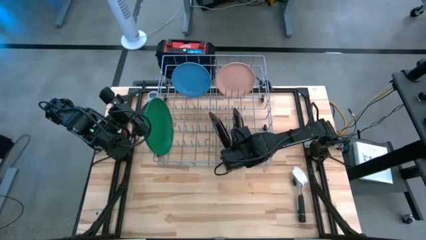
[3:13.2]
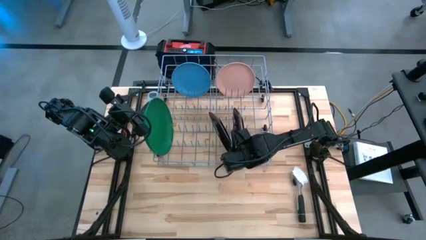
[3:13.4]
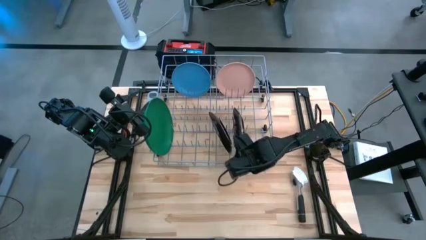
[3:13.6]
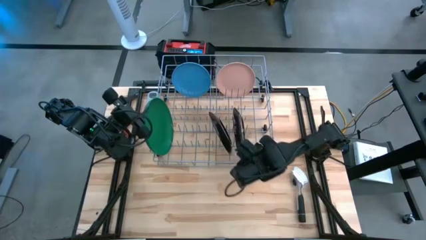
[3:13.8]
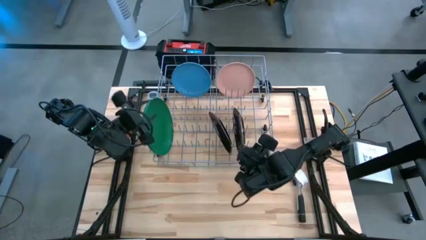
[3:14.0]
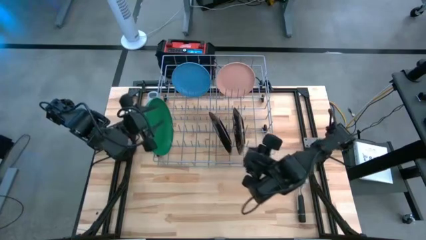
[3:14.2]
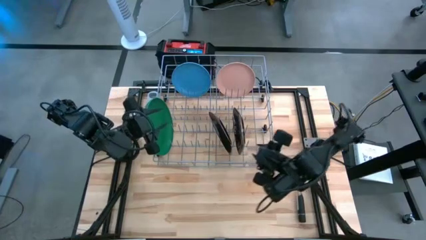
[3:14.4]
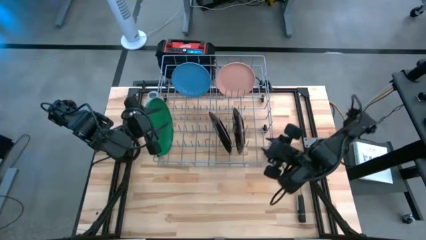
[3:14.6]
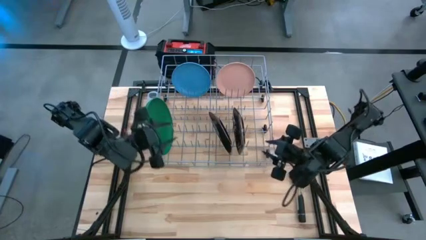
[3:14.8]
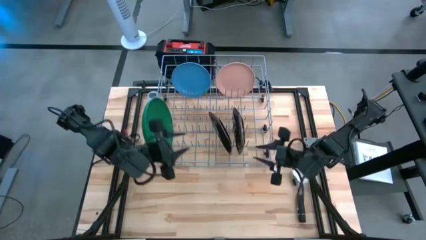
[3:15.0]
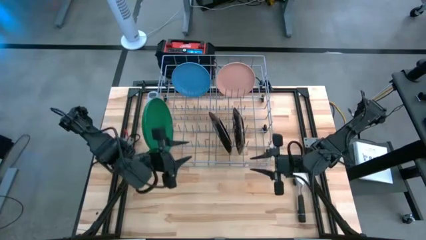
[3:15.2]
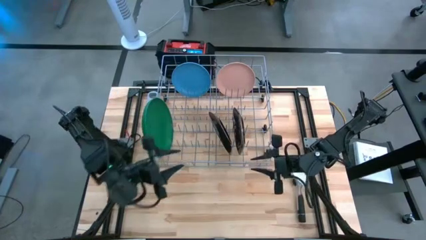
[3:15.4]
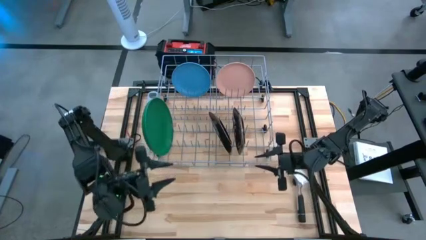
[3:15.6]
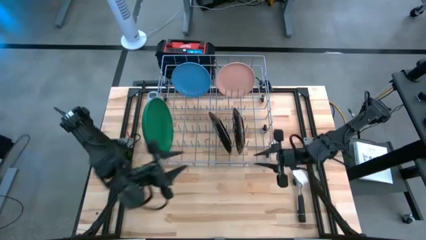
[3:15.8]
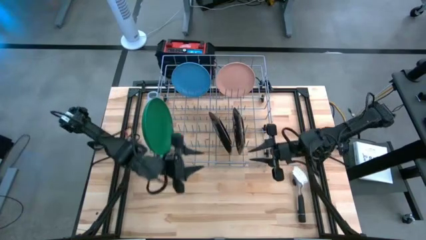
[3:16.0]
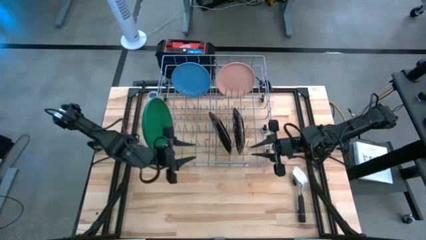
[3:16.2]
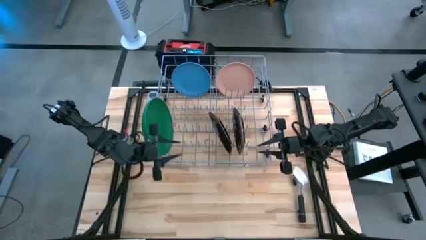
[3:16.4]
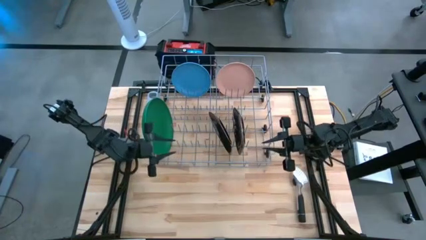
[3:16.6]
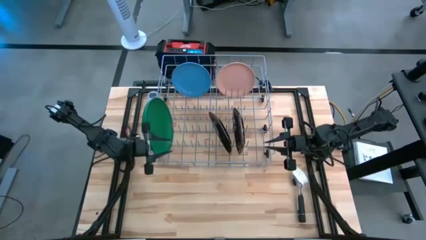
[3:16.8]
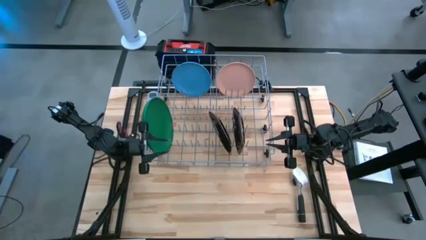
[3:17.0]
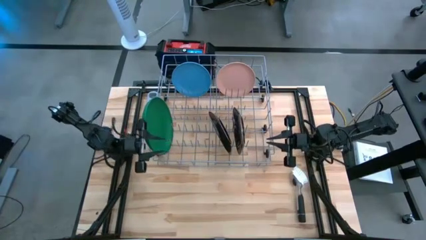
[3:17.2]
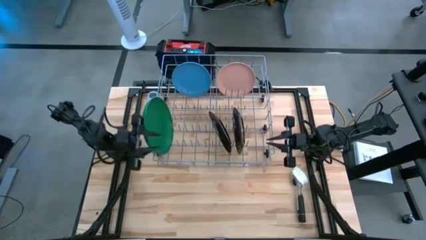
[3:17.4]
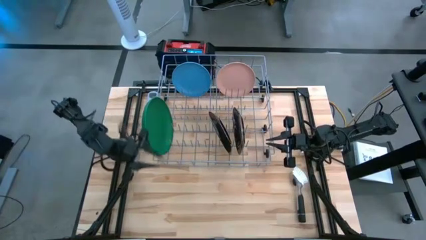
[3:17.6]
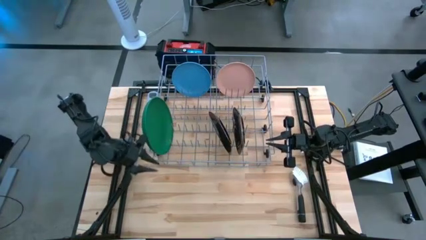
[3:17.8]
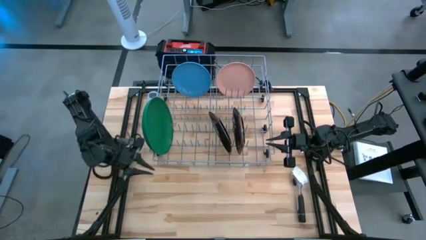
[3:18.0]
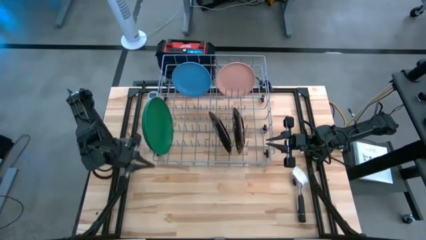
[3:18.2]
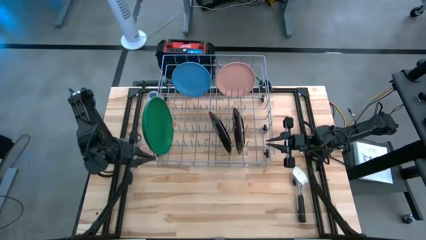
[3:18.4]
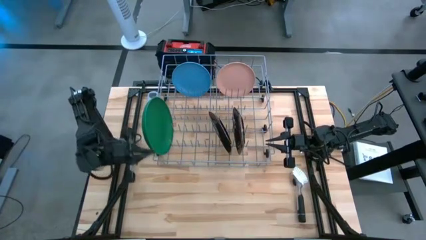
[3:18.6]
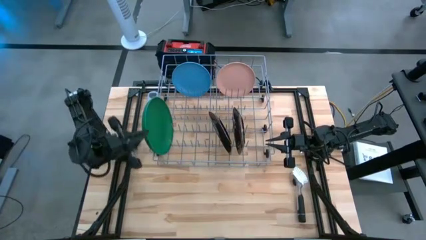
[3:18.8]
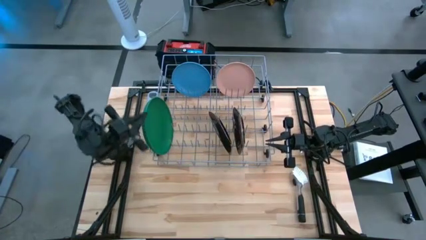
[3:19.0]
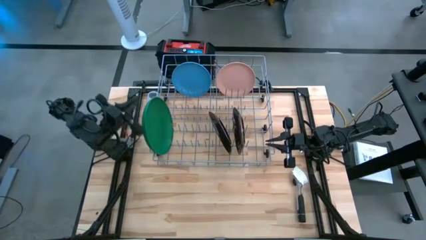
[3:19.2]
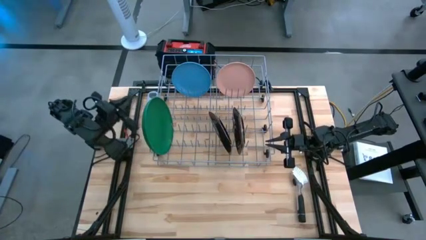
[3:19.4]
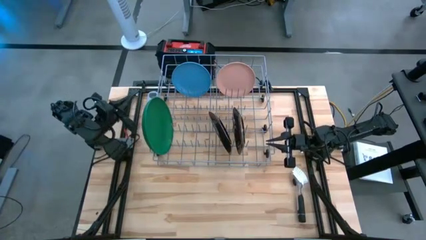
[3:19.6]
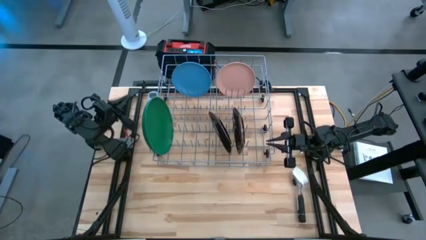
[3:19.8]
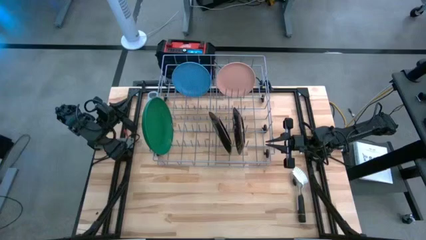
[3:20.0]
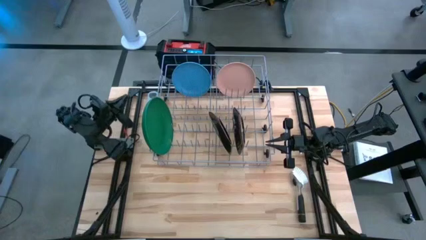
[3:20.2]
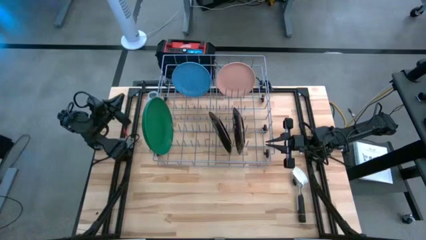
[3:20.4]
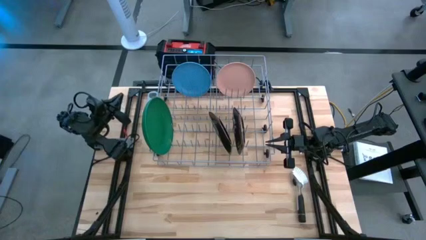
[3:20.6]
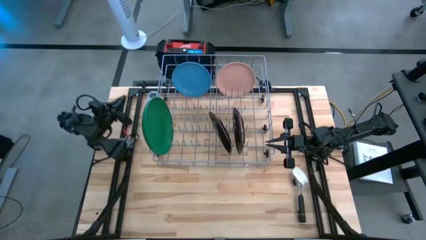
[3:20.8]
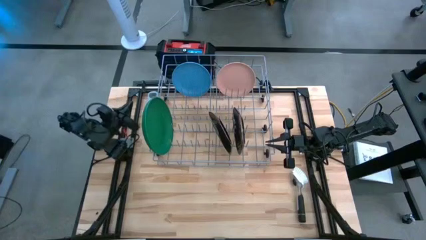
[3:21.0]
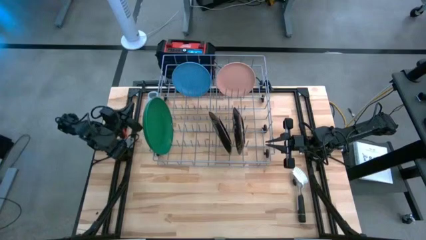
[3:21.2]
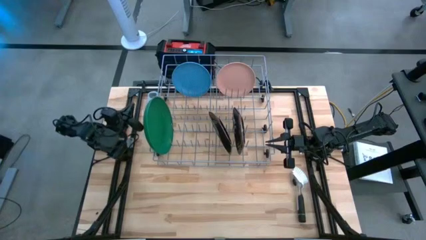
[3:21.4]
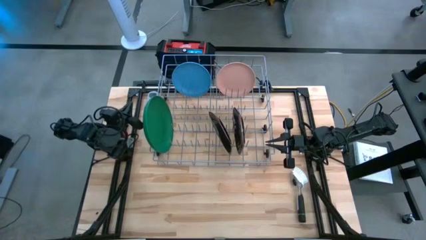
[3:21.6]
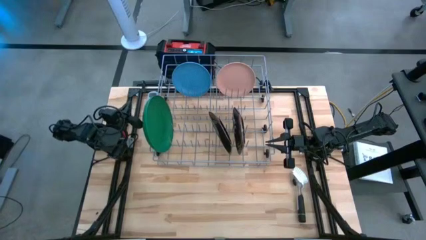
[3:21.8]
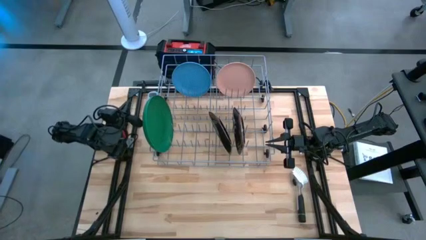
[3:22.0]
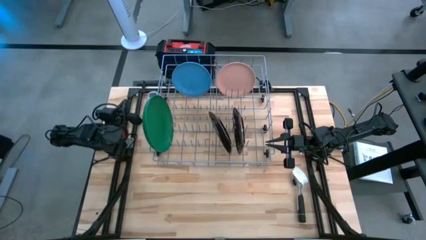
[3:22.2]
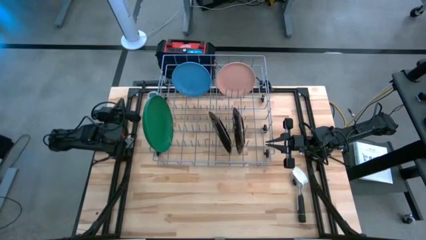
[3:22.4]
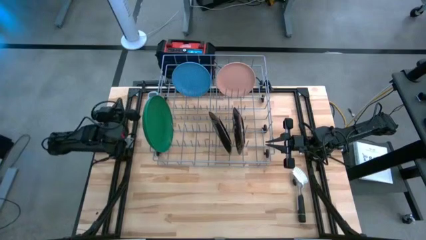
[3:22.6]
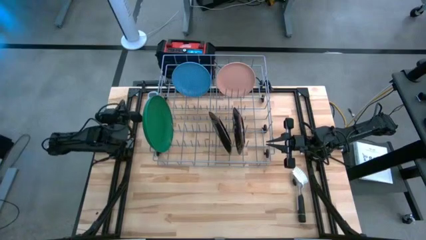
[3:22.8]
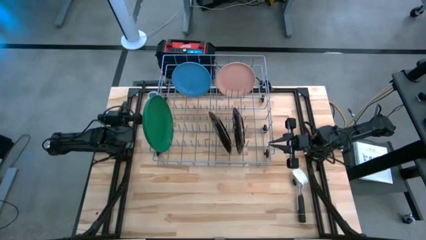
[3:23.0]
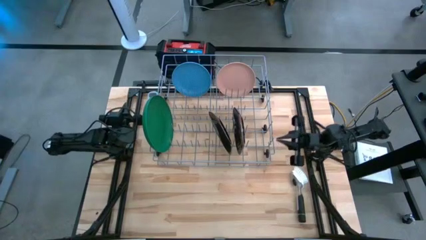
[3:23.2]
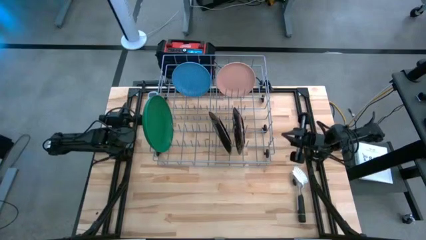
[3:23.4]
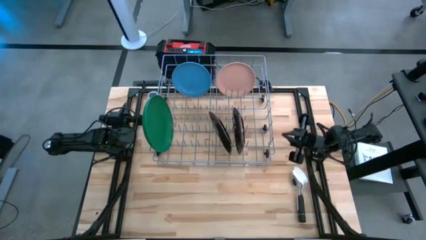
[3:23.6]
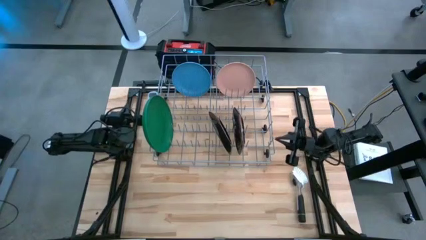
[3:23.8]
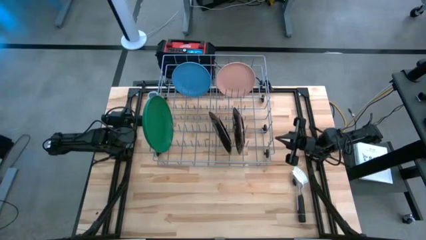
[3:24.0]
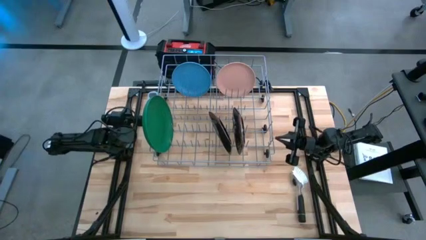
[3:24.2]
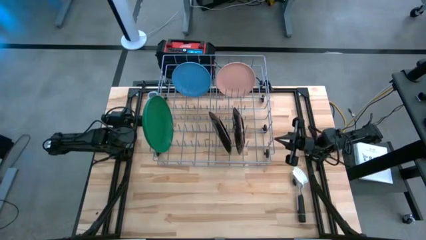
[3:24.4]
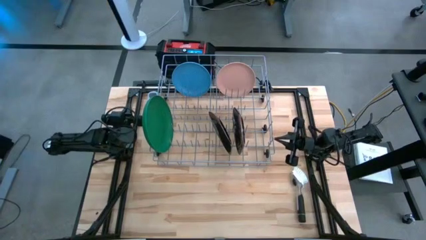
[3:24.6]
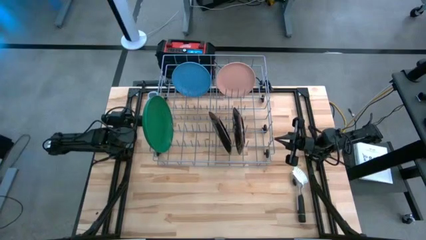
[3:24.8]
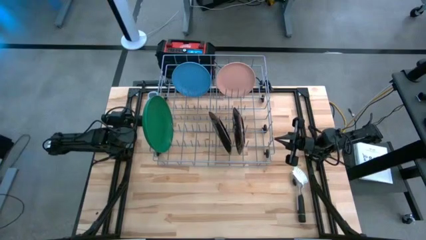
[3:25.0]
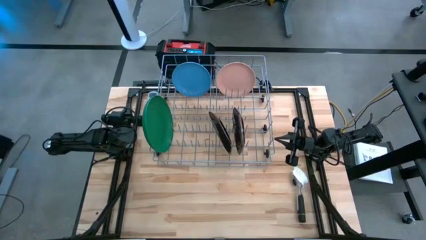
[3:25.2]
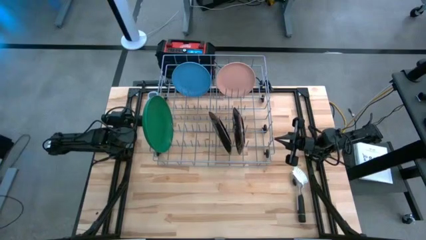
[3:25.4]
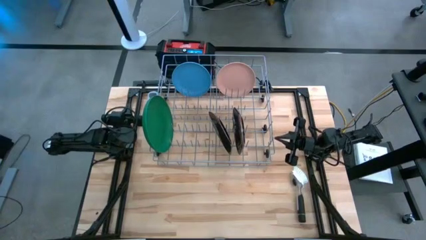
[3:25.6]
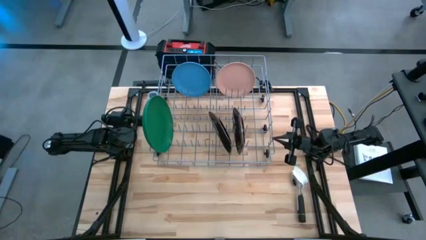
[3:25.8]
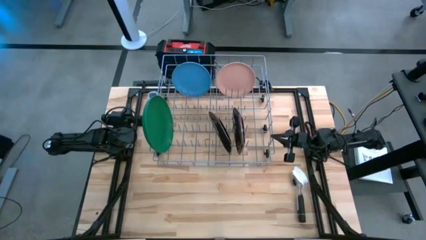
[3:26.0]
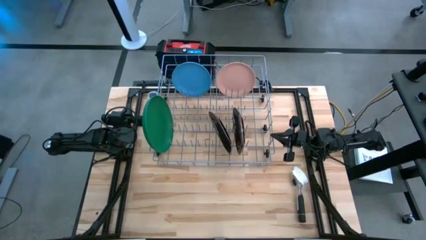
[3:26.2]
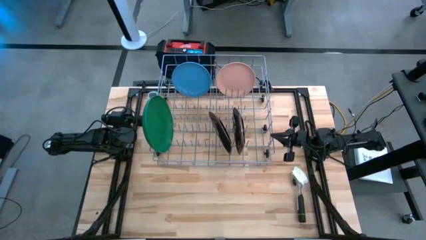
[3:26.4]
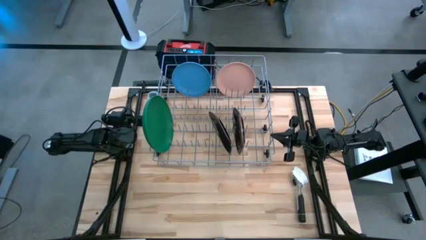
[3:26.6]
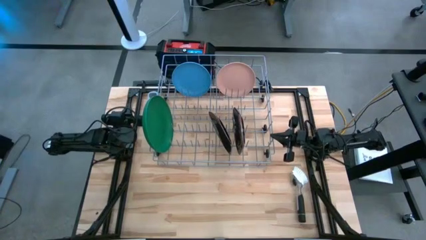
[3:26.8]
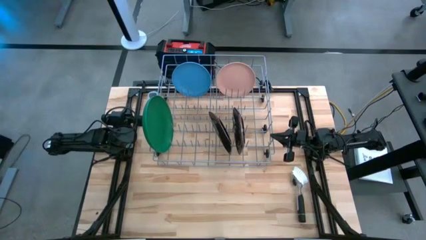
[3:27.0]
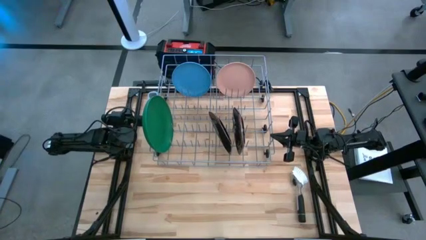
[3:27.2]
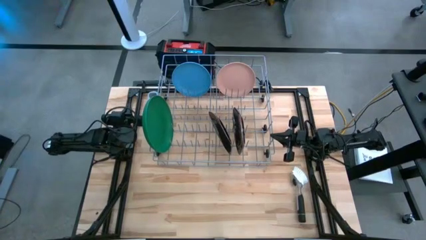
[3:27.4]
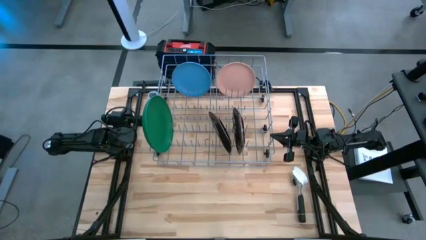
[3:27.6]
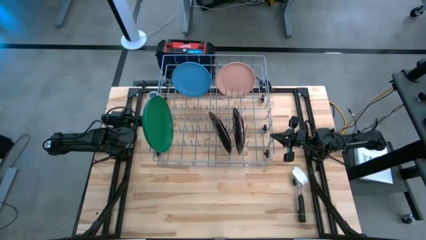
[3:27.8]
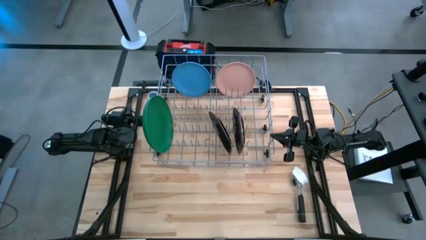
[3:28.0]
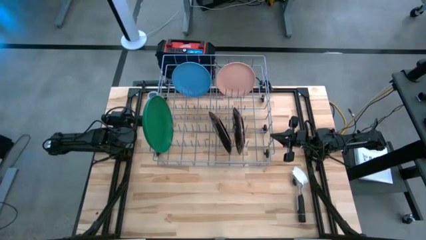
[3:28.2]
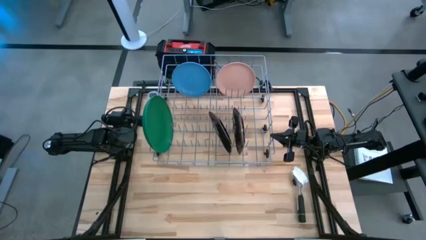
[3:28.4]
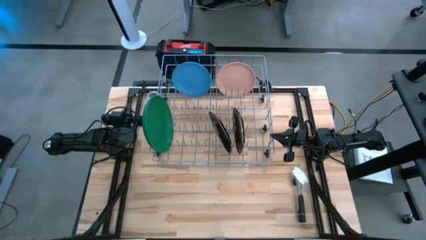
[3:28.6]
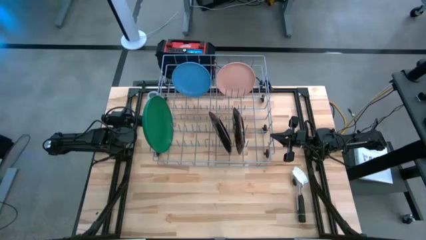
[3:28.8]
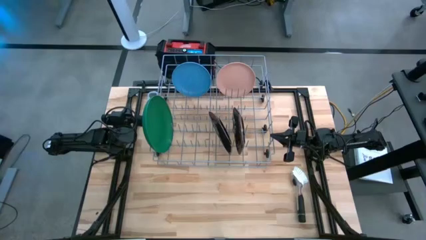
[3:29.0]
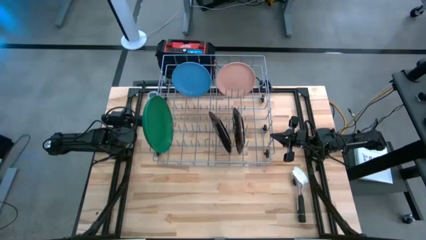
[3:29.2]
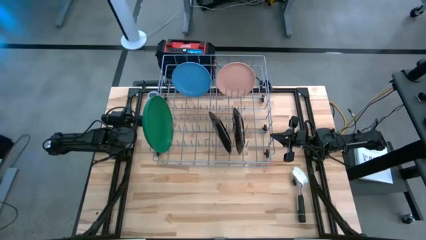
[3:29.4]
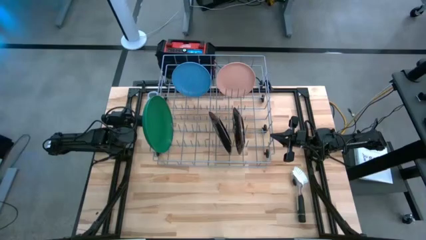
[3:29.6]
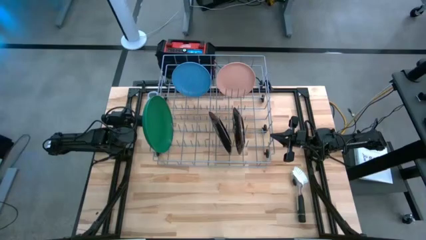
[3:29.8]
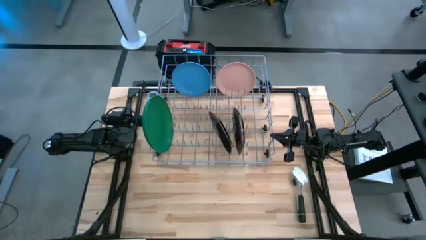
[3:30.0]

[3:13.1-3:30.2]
Task: Sort dishes
Return to Home Position
